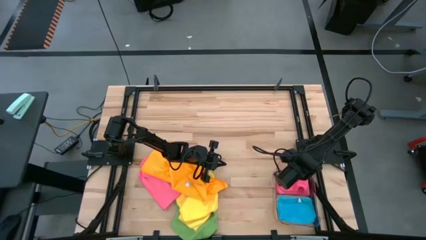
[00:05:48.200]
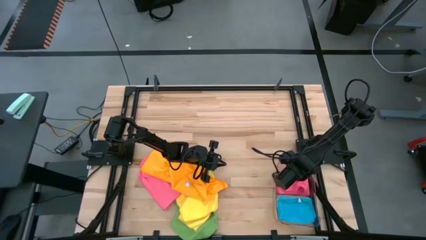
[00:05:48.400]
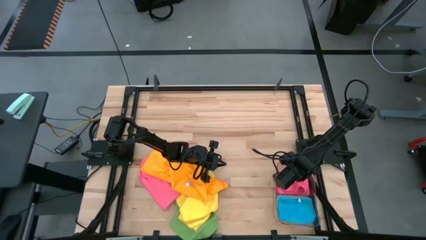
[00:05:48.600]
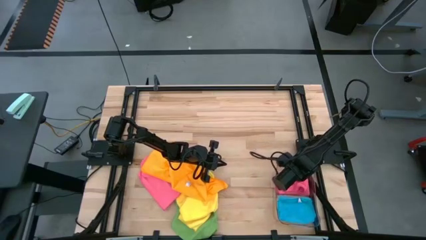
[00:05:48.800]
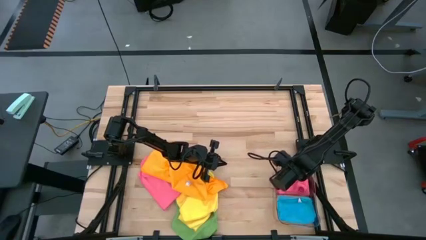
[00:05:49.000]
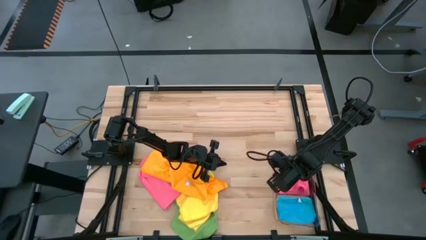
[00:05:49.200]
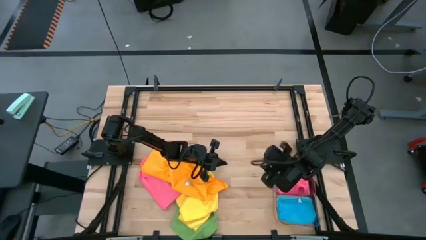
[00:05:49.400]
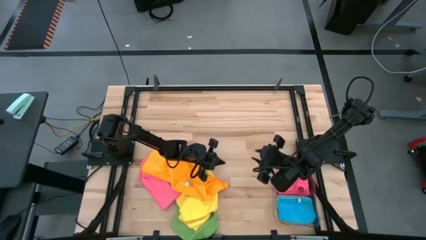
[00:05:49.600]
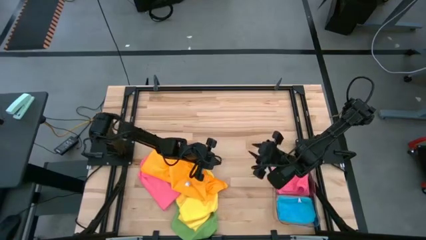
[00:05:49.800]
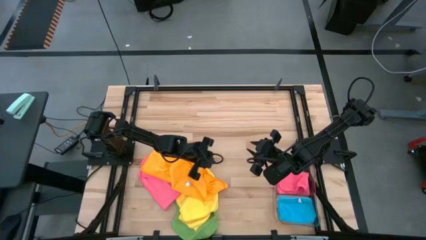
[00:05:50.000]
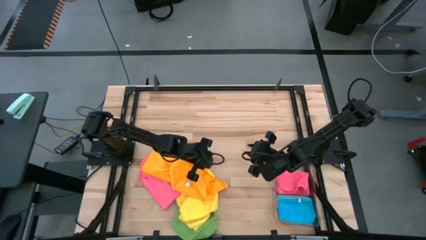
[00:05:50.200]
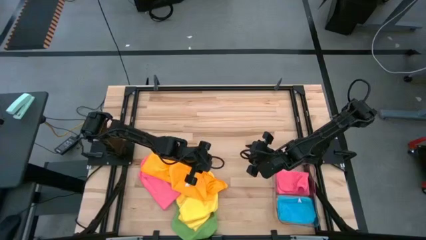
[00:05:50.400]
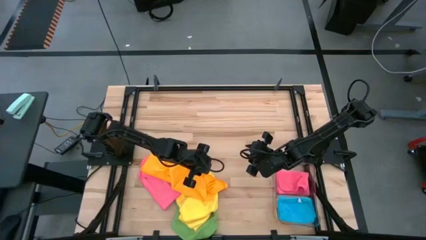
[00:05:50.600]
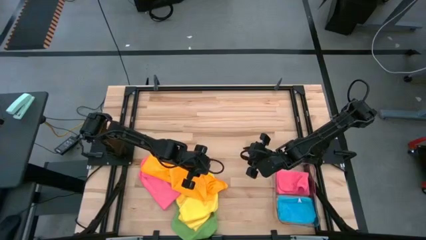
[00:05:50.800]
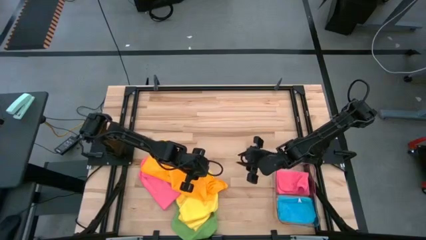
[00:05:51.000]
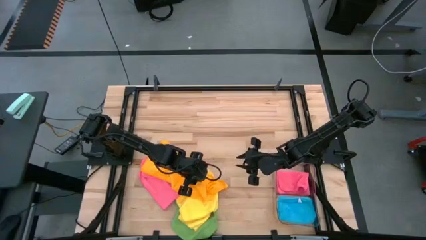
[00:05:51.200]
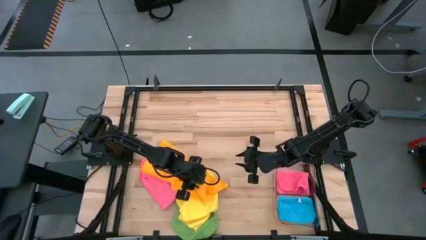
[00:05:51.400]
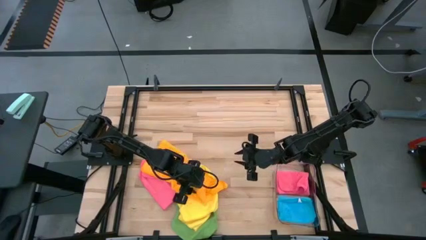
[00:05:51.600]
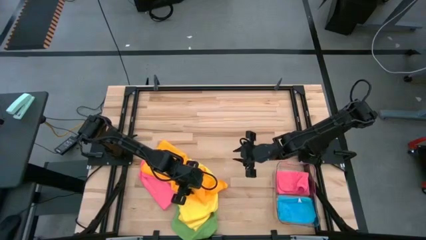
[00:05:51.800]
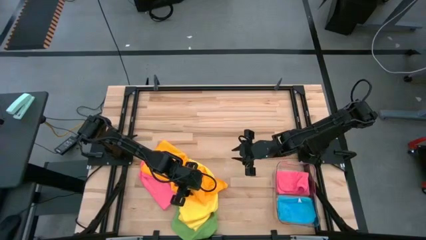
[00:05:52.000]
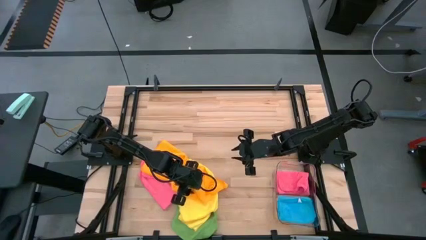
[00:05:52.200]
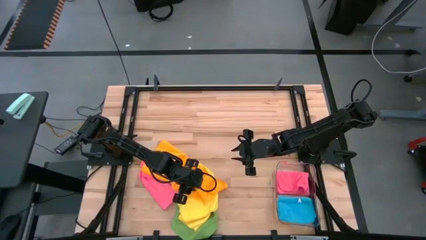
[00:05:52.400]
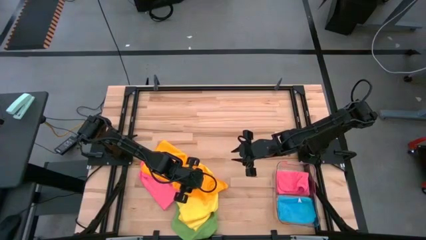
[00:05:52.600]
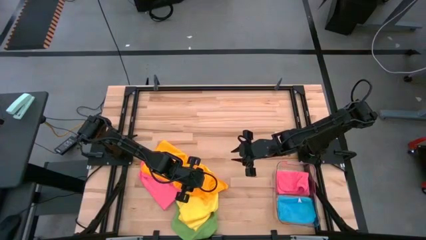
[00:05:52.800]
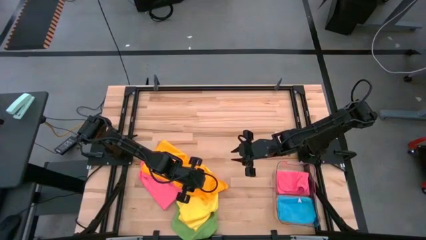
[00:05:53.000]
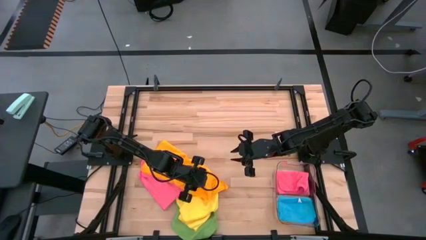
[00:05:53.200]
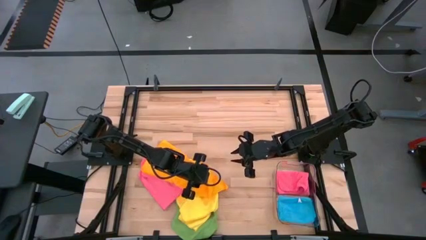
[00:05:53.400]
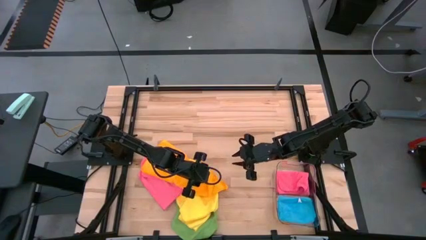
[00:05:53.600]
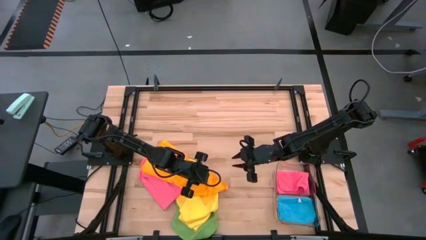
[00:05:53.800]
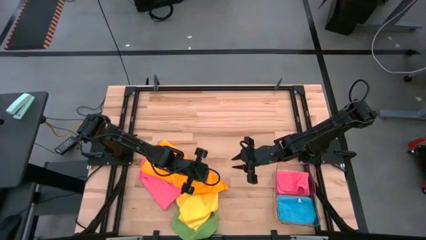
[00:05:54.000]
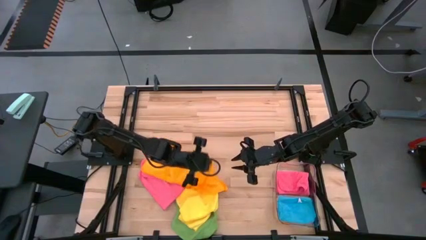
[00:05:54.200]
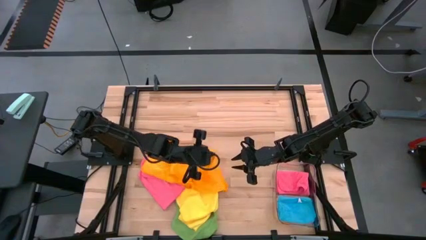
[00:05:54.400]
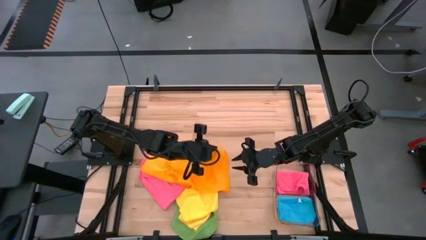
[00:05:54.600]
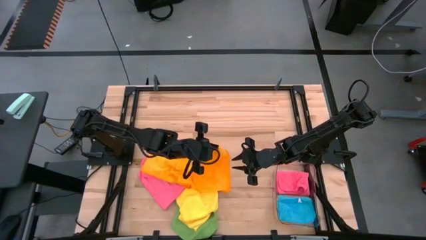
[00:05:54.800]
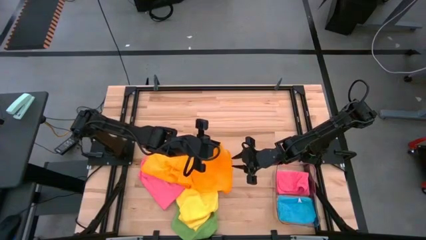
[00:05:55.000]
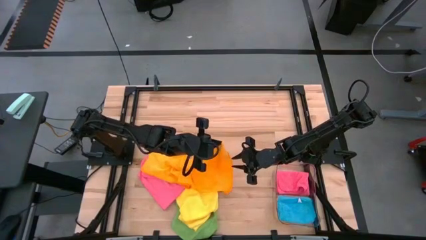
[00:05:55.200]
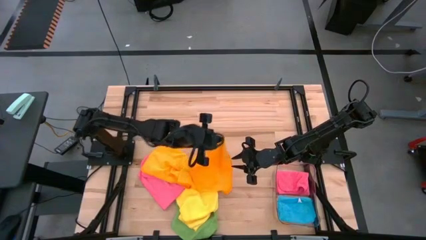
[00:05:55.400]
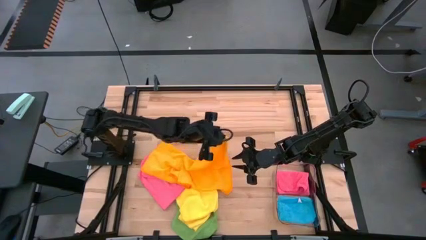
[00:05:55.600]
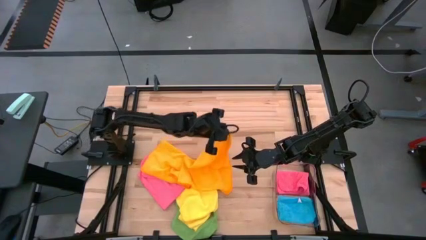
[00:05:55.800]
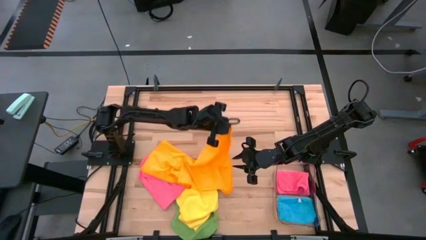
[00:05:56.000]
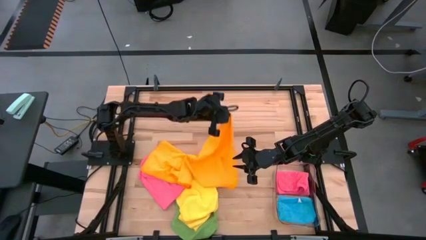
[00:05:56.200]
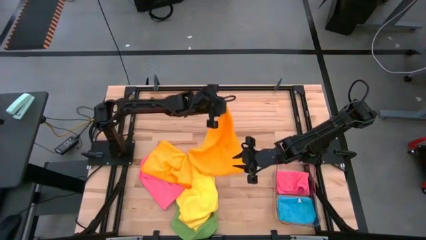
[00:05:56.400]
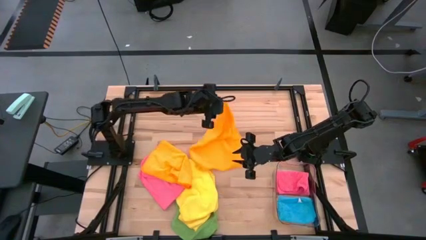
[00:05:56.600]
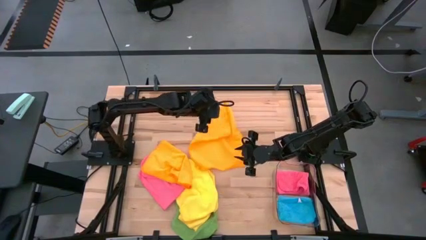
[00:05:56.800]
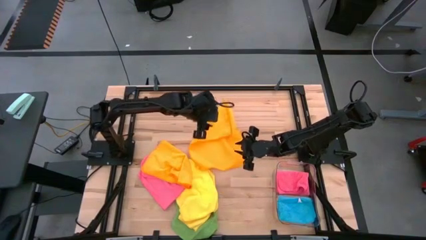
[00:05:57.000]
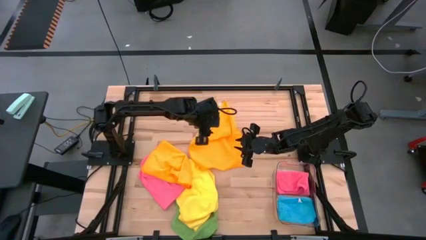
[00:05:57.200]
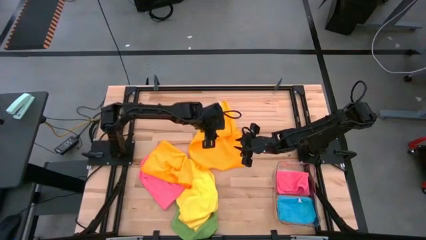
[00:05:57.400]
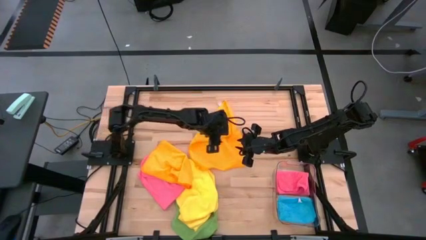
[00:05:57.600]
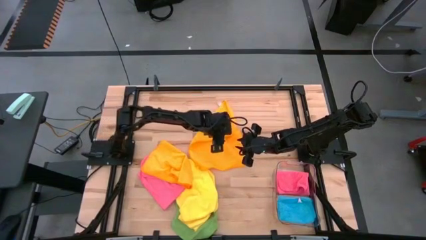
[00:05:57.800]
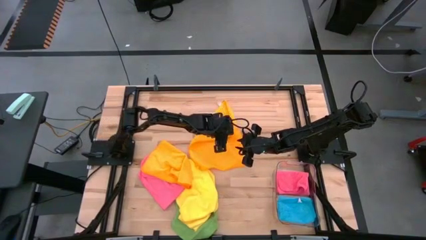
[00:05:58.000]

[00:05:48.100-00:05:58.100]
Task: Fold microfiber towels
Fold the orange towel

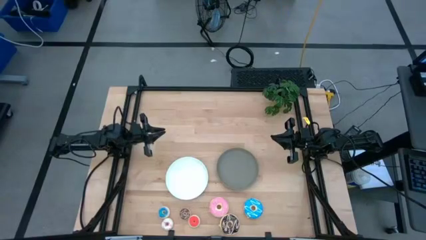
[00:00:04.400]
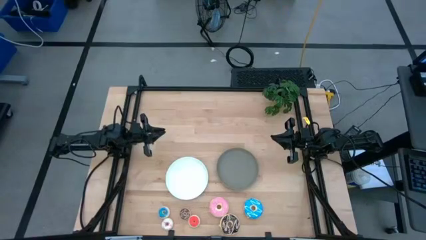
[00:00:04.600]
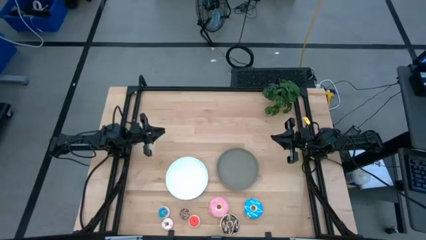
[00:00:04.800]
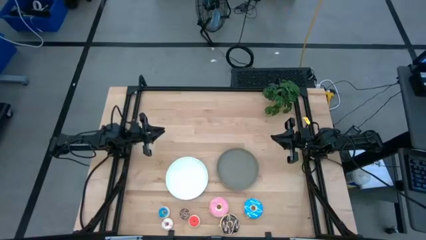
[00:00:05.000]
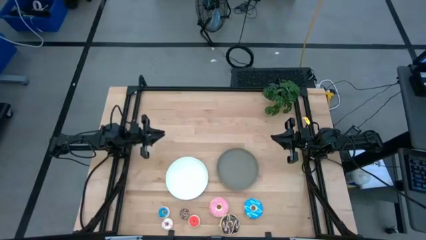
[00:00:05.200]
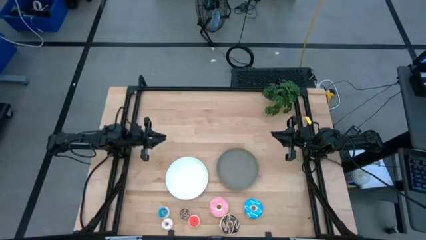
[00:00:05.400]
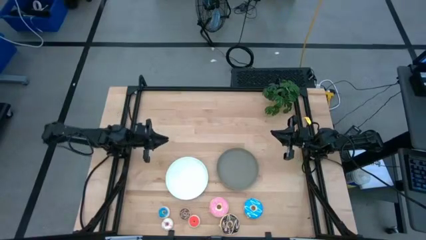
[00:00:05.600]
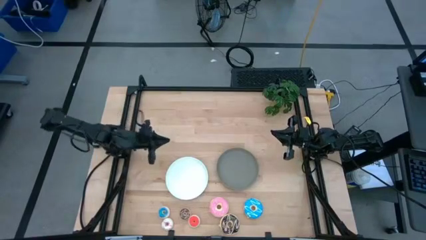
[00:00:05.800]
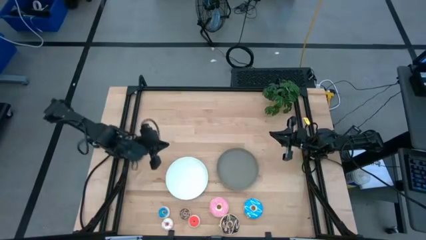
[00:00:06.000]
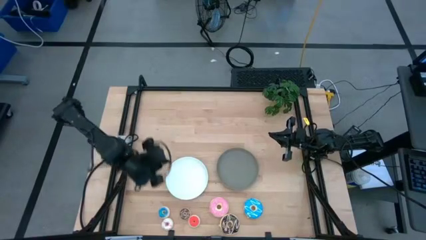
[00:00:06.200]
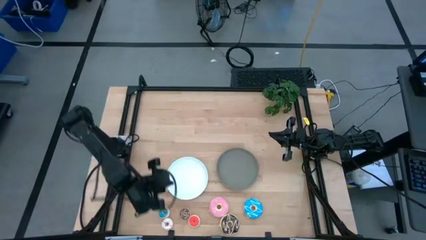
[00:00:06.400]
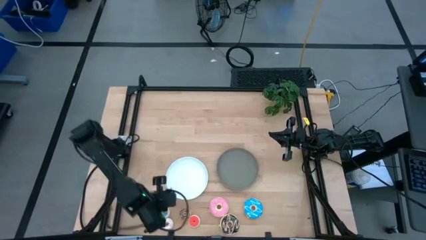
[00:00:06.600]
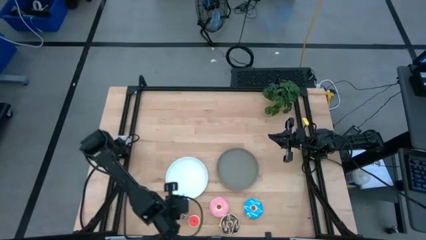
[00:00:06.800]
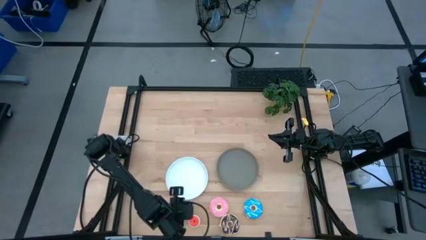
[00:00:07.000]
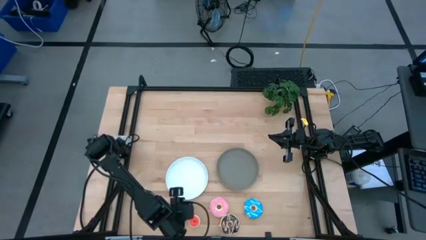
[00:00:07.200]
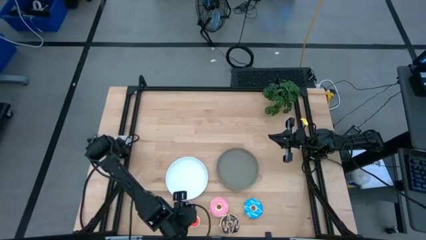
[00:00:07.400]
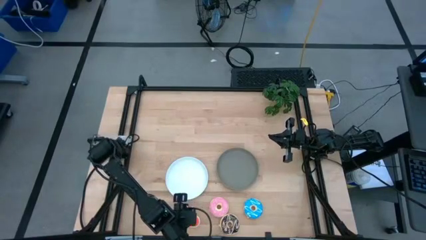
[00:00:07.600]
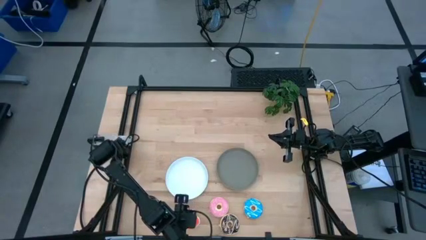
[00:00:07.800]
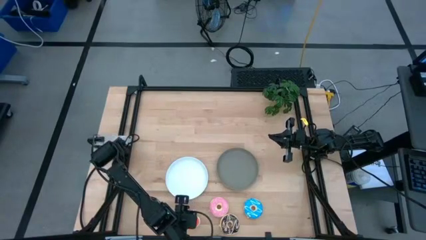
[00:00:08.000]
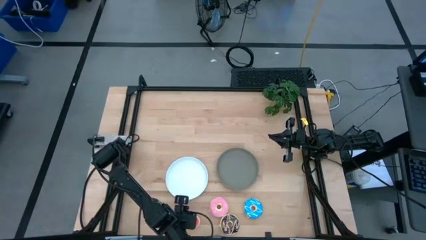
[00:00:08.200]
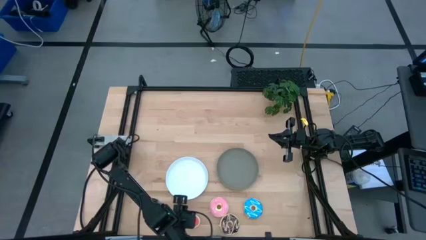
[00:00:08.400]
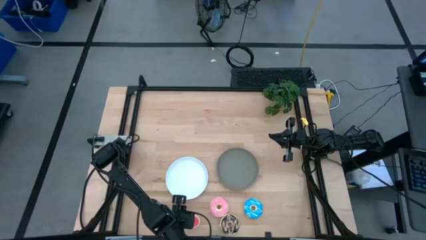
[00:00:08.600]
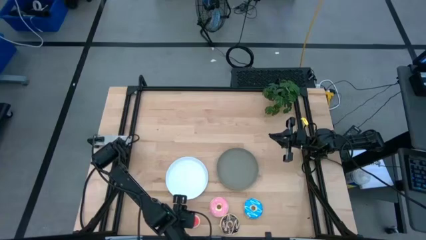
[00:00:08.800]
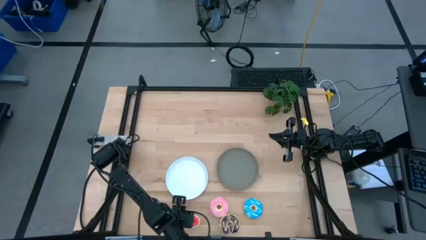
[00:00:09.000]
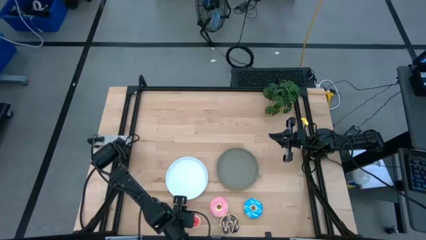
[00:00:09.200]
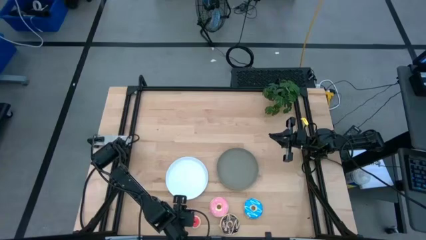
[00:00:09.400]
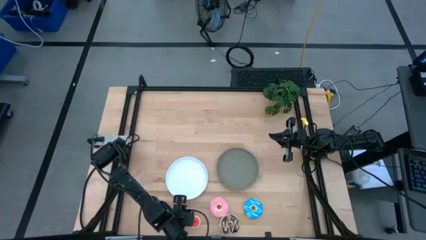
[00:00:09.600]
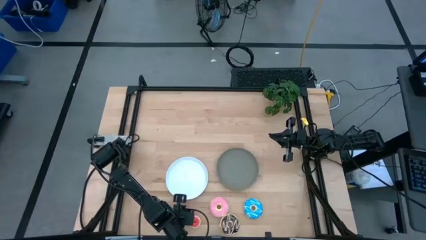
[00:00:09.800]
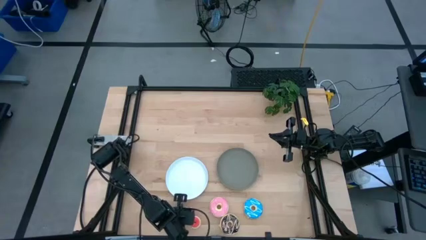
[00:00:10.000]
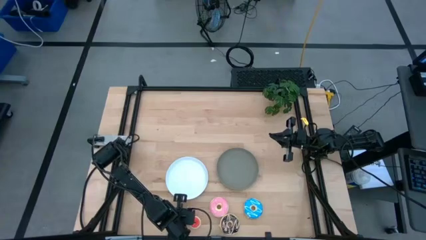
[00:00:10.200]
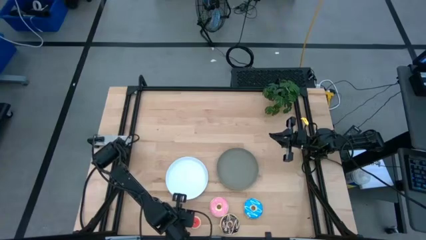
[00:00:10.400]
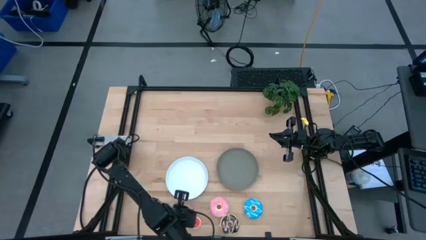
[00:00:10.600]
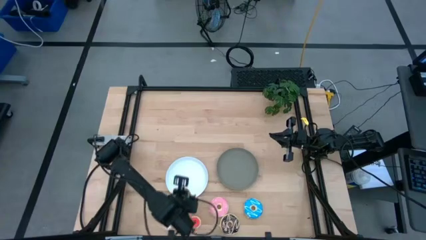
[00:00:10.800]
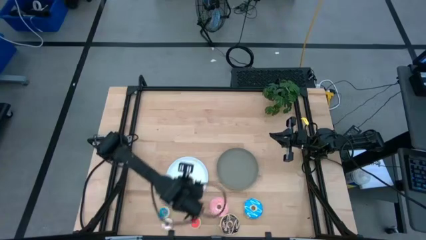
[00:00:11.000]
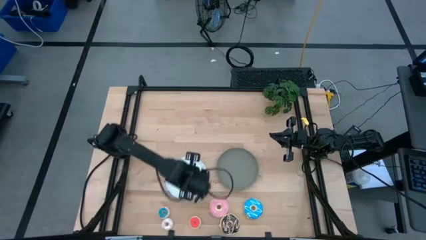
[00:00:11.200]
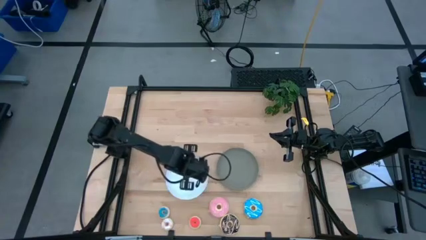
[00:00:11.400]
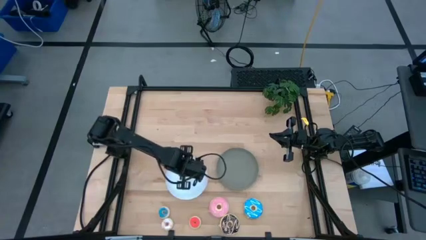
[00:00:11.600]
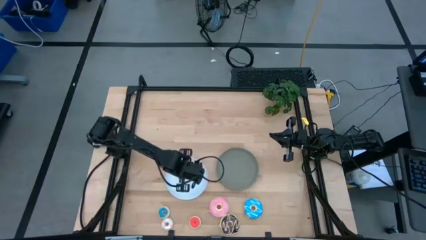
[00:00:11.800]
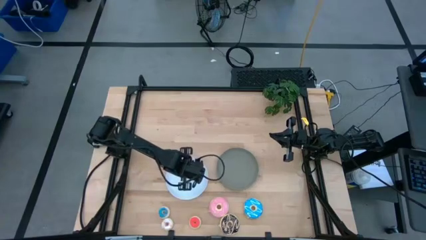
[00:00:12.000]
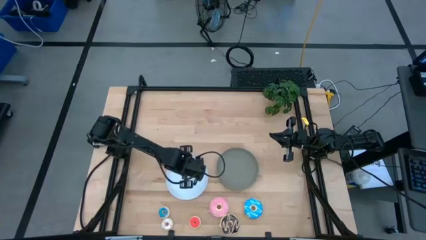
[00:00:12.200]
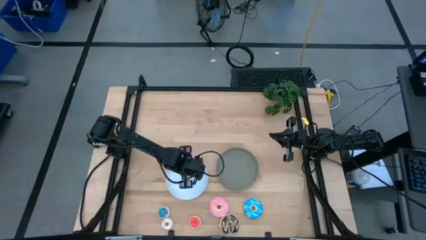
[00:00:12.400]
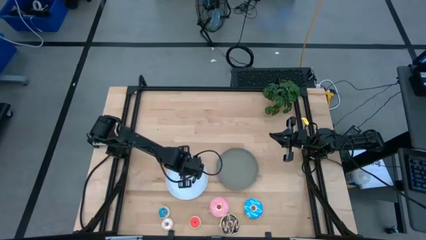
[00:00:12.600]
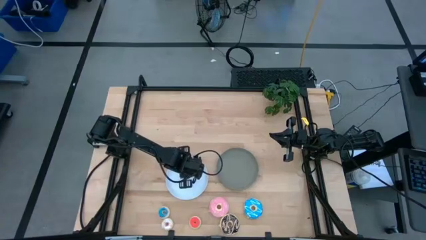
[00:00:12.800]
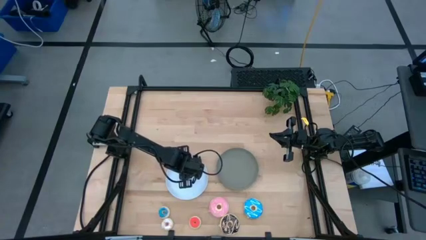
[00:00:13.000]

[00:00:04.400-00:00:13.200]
Task: Pick & Place donuts
Put the small brown donut on the white plate
